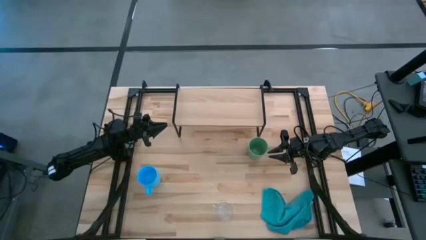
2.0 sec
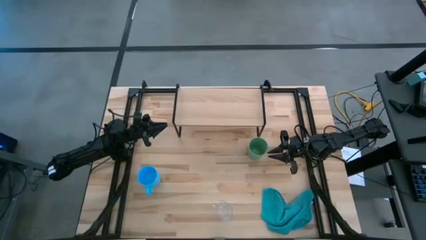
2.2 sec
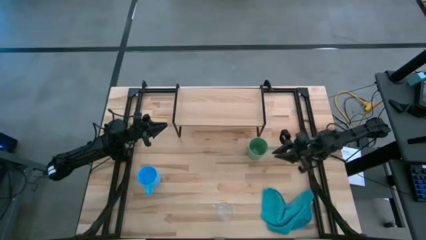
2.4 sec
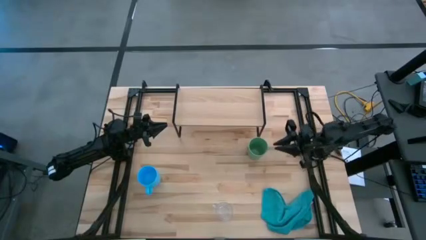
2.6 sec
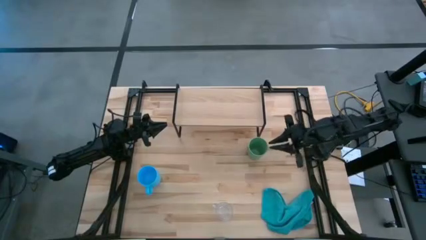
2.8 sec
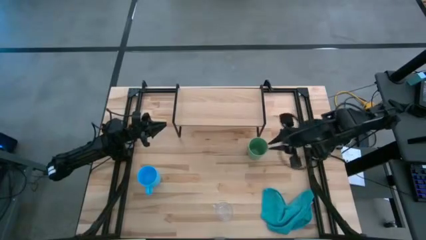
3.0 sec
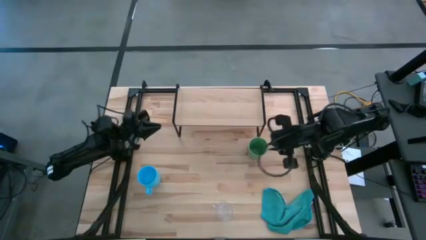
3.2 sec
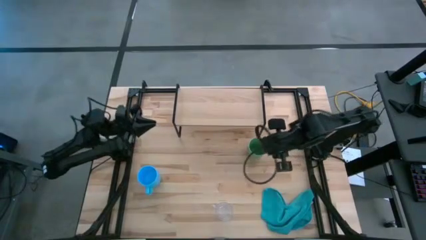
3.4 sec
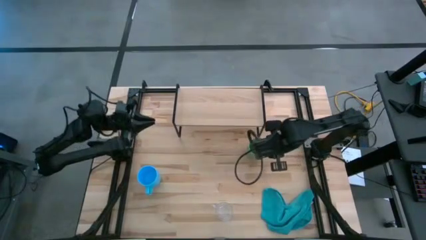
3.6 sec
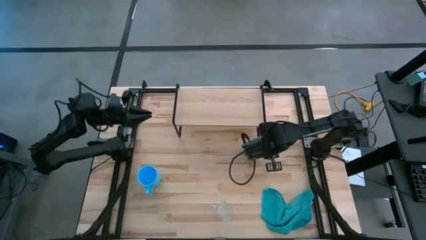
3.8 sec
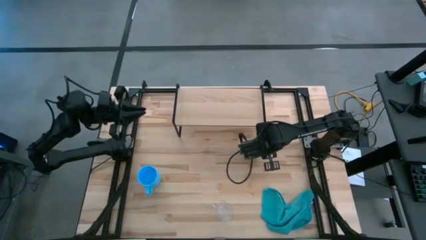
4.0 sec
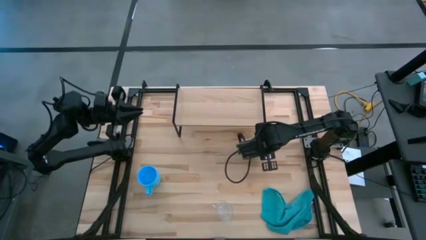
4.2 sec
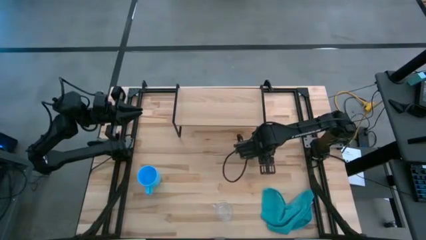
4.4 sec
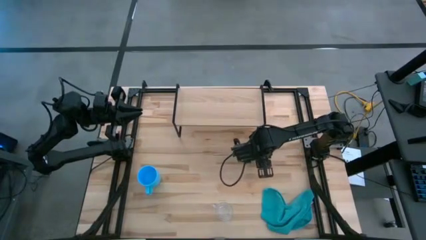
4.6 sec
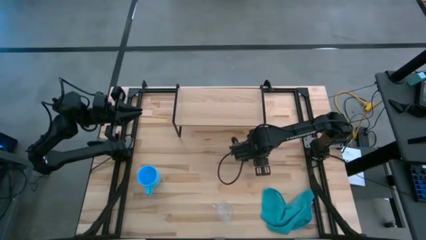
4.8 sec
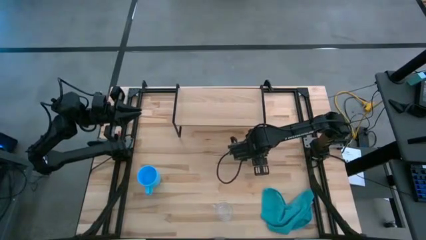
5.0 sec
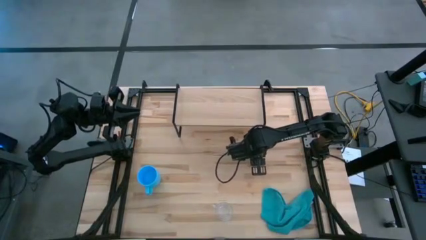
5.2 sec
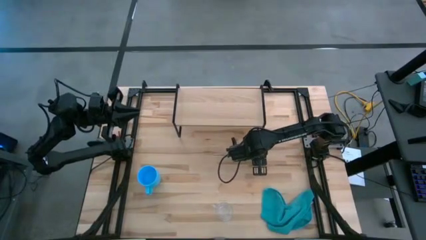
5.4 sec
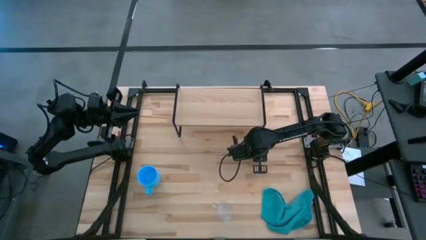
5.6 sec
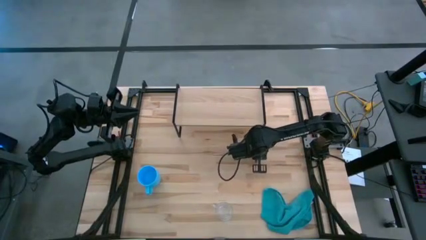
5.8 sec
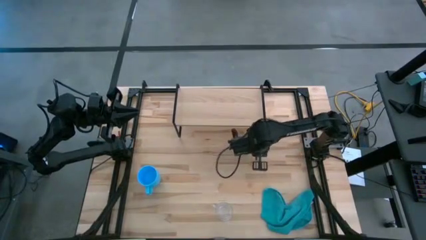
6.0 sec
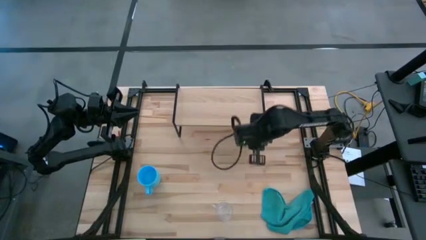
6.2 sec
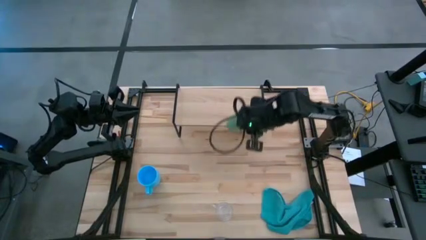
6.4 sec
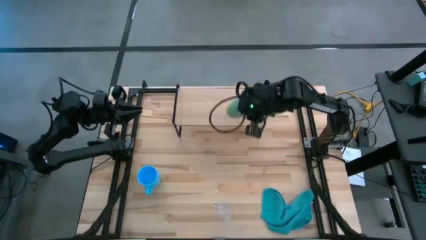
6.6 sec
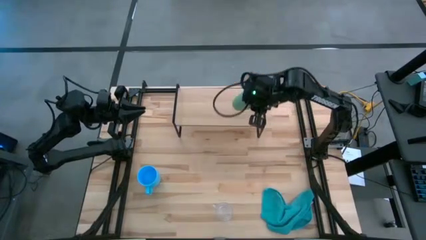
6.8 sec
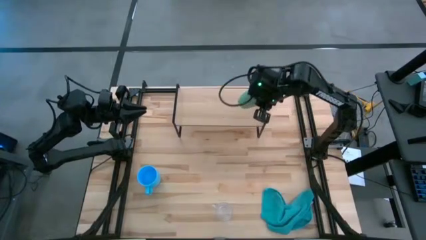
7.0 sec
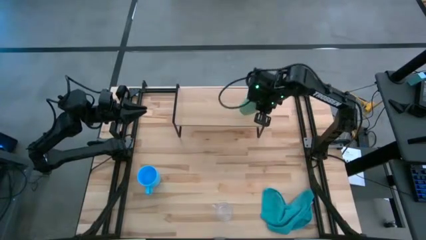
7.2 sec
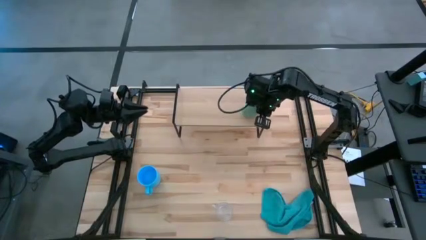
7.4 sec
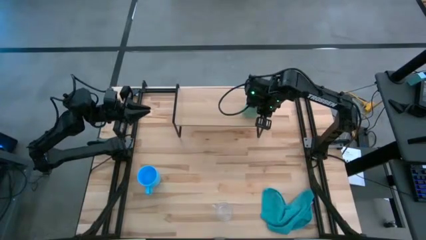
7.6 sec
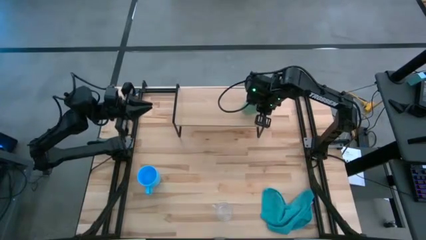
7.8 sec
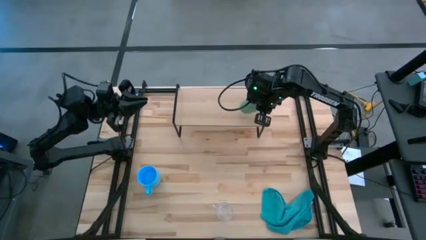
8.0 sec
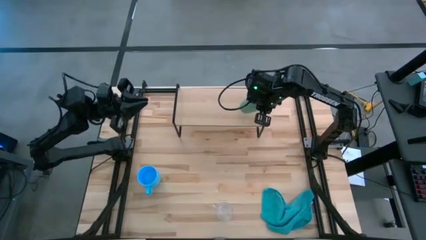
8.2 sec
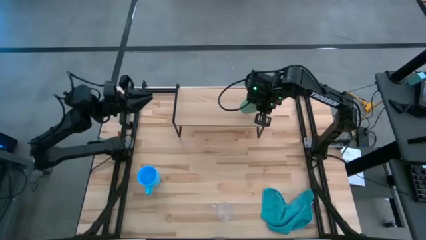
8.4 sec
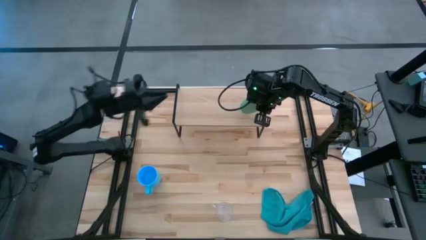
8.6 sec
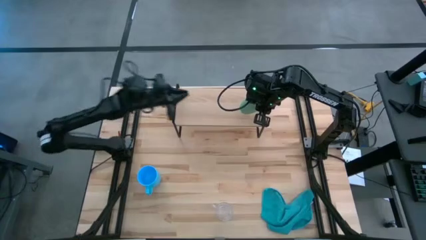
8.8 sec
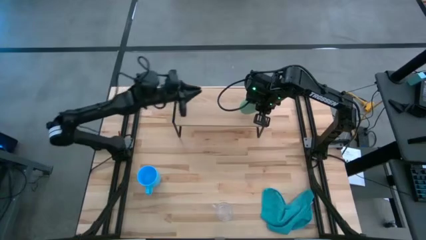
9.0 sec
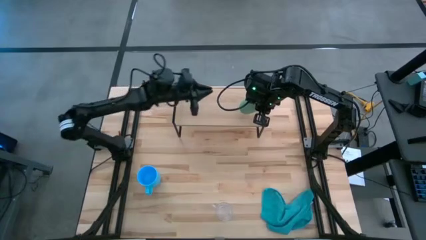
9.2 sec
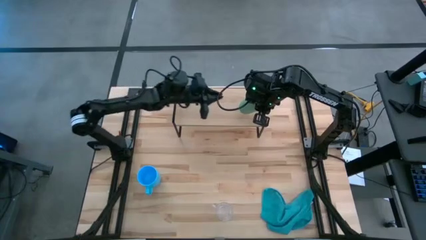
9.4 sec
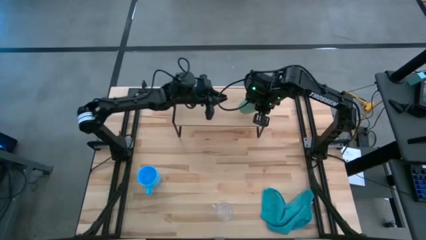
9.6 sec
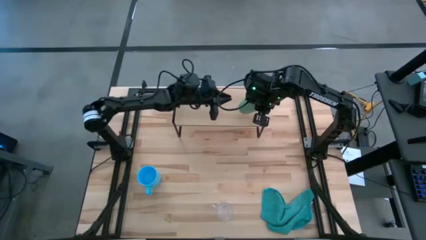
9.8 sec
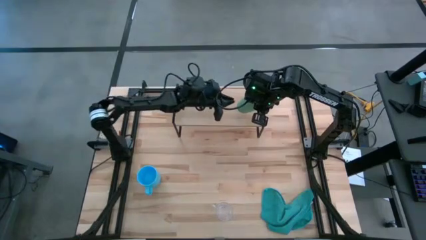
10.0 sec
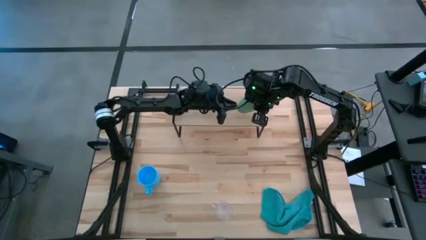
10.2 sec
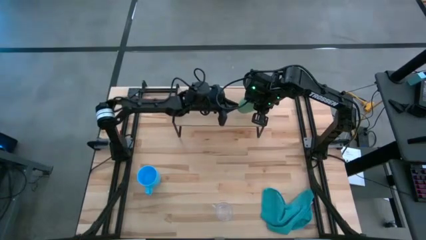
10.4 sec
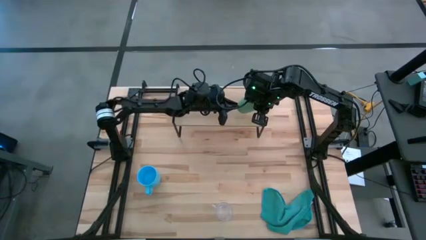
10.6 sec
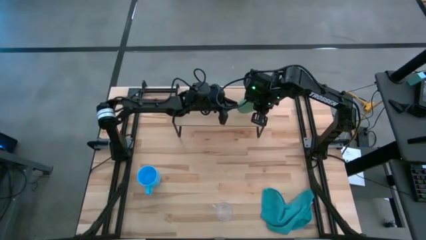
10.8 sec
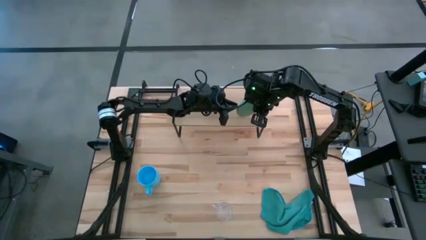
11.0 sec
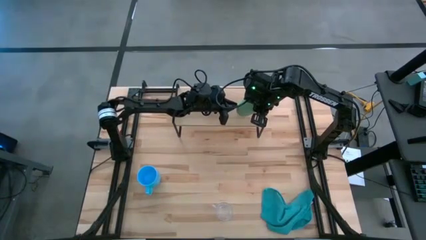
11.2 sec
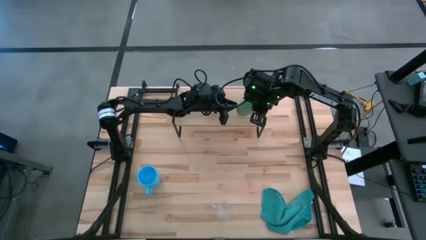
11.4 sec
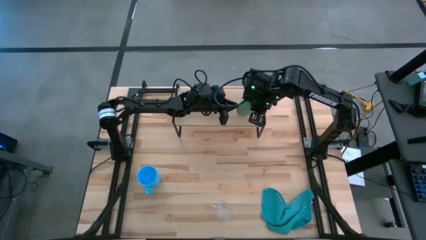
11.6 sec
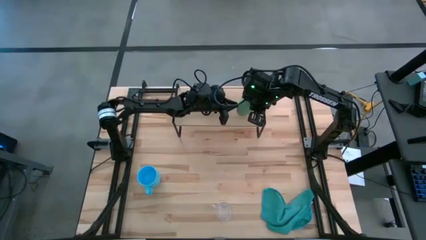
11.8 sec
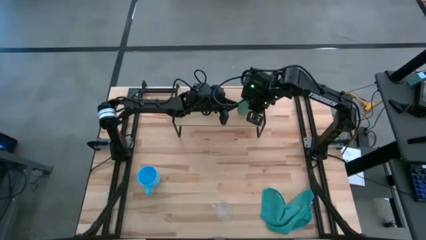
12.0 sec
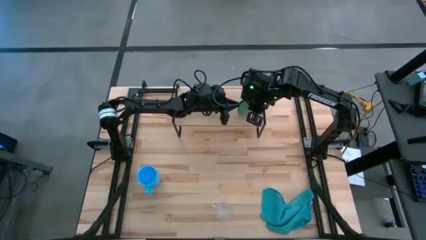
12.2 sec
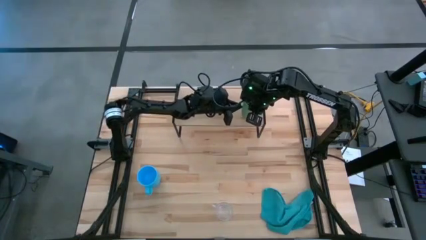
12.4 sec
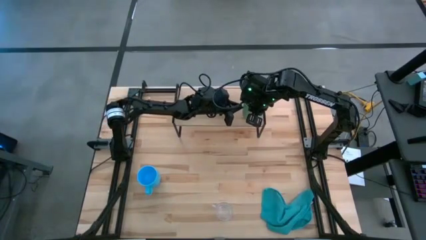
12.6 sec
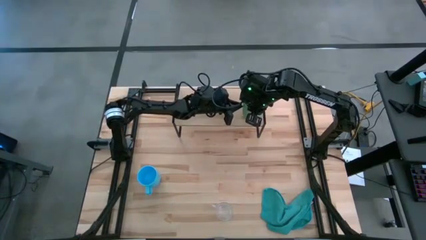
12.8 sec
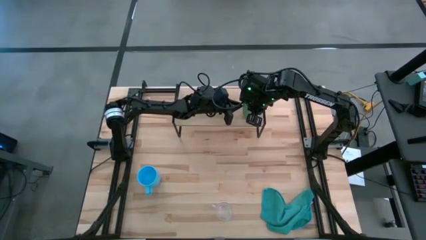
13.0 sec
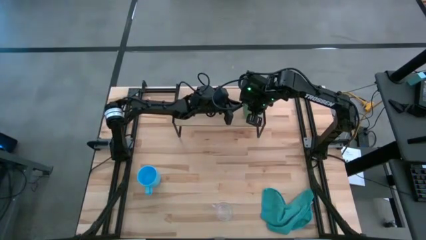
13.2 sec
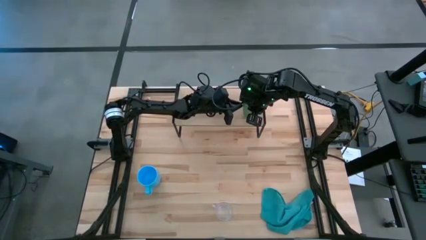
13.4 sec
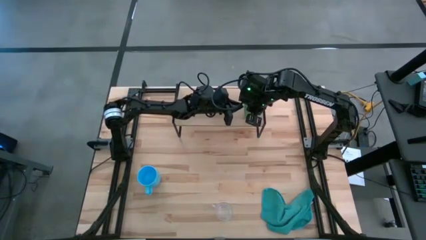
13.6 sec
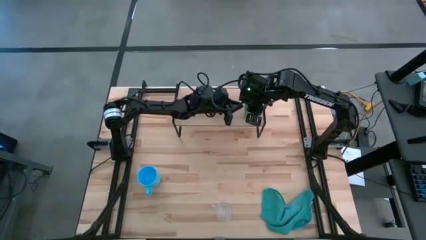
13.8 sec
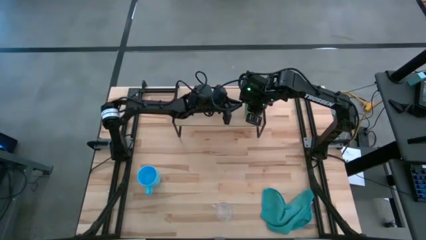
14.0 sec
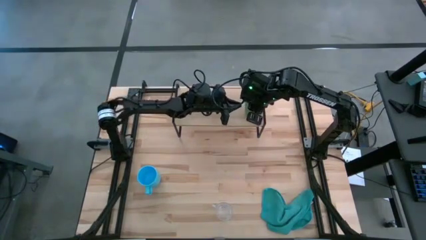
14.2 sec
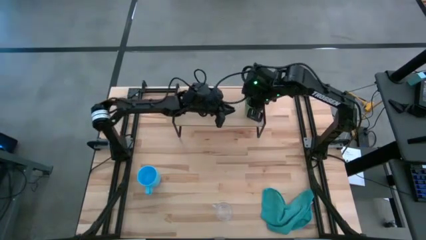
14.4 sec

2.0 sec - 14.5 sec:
Task: Stack small to large cups/mugs on shelf
Put the green cup on the shelf
